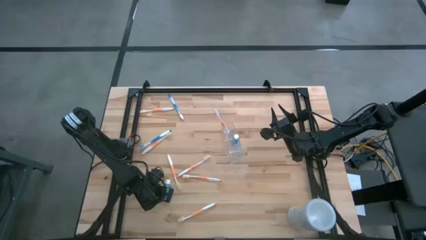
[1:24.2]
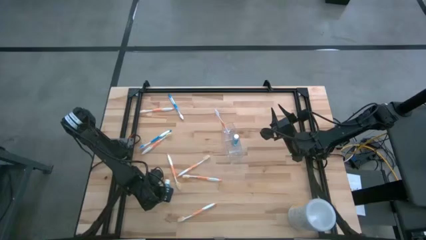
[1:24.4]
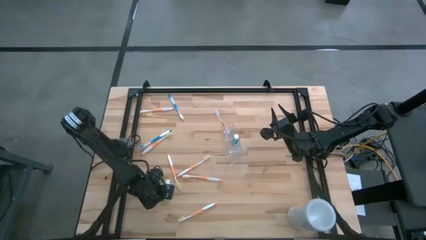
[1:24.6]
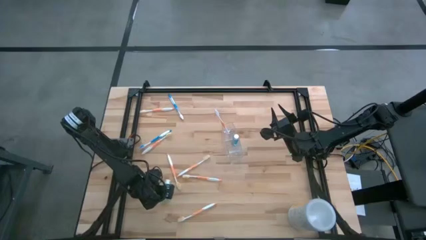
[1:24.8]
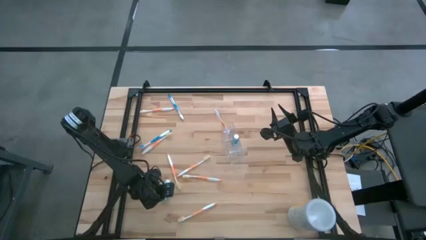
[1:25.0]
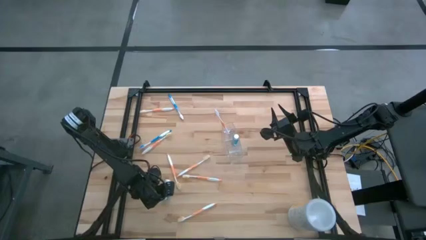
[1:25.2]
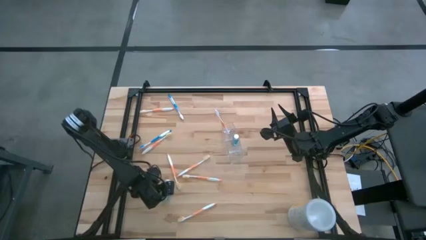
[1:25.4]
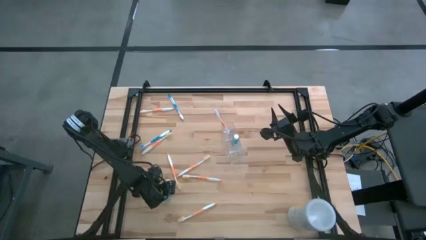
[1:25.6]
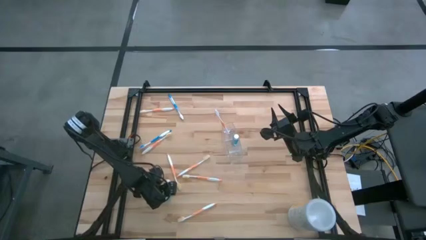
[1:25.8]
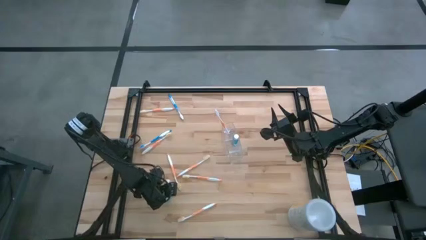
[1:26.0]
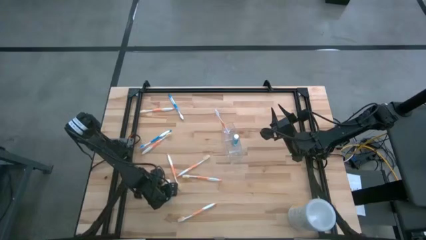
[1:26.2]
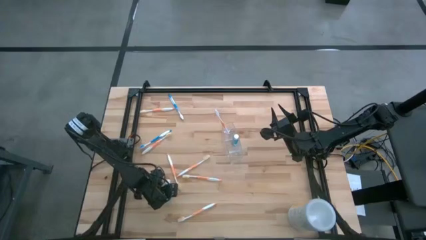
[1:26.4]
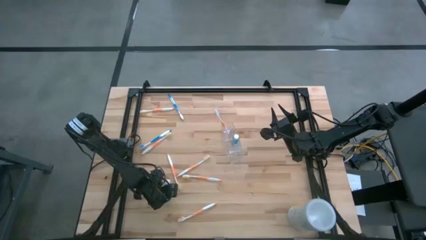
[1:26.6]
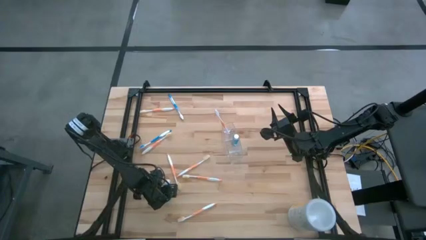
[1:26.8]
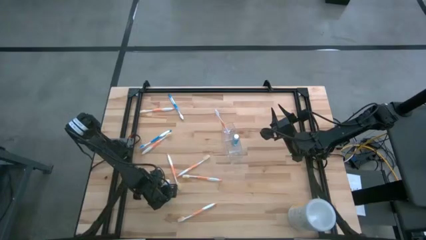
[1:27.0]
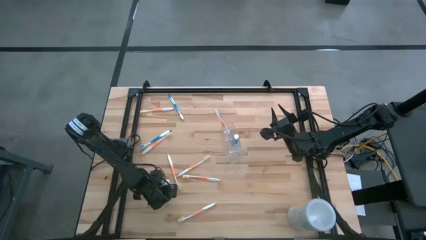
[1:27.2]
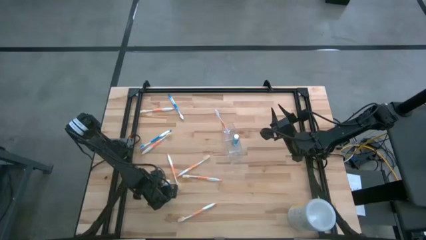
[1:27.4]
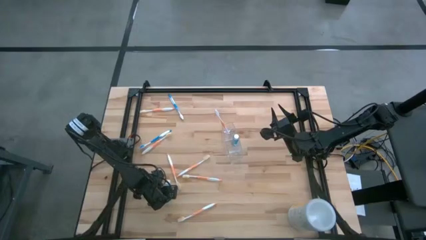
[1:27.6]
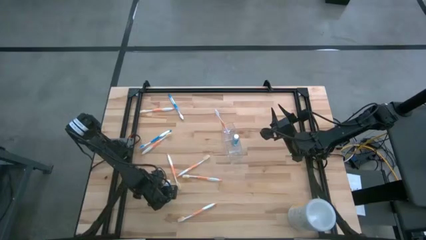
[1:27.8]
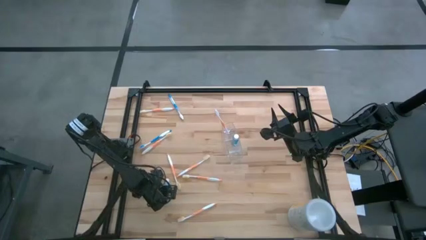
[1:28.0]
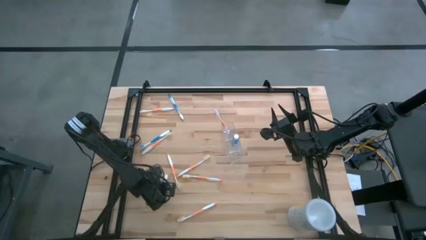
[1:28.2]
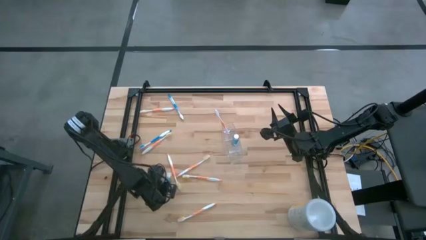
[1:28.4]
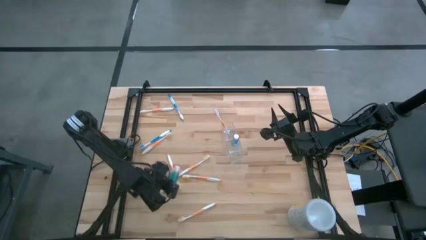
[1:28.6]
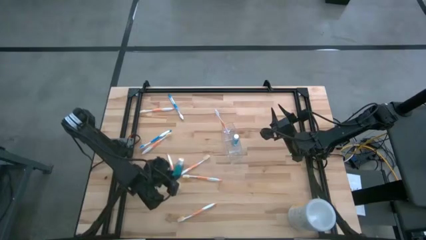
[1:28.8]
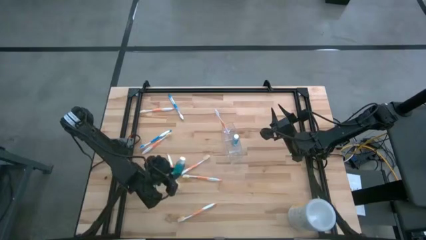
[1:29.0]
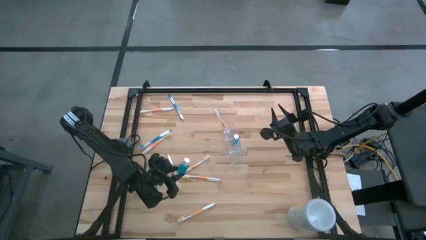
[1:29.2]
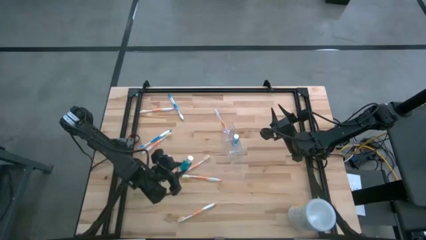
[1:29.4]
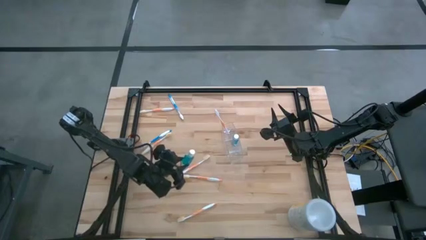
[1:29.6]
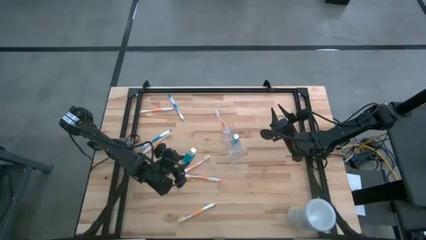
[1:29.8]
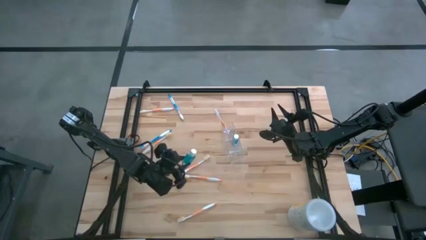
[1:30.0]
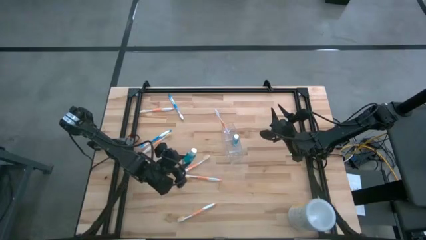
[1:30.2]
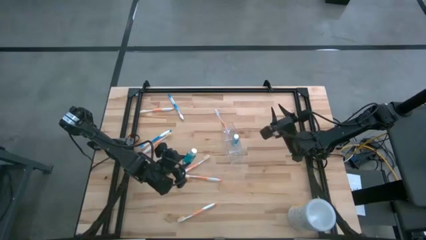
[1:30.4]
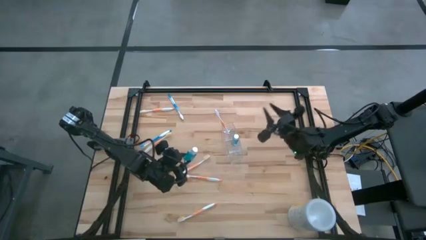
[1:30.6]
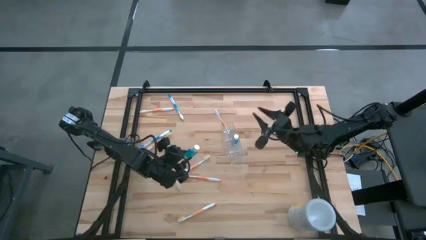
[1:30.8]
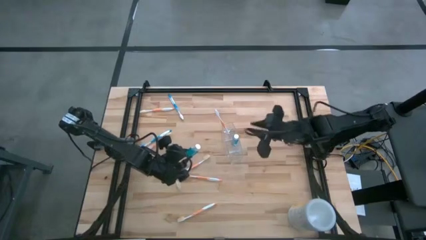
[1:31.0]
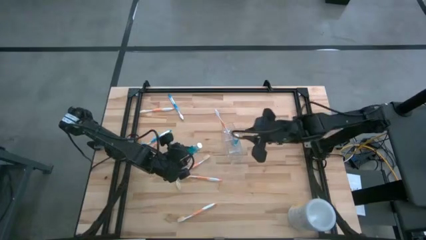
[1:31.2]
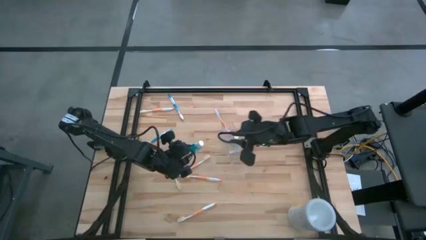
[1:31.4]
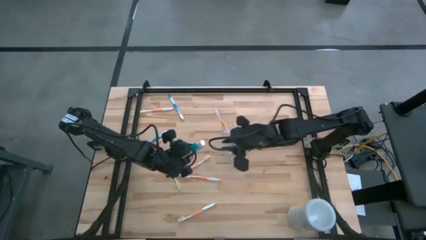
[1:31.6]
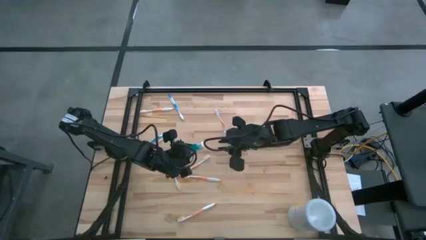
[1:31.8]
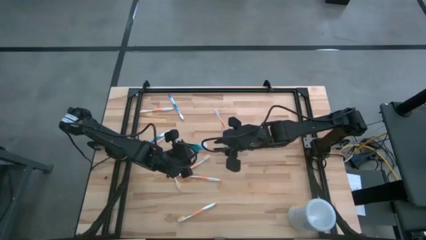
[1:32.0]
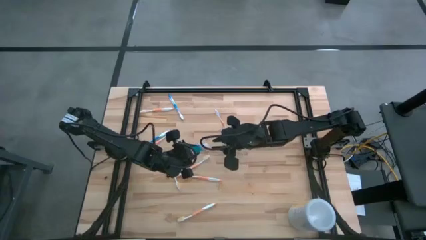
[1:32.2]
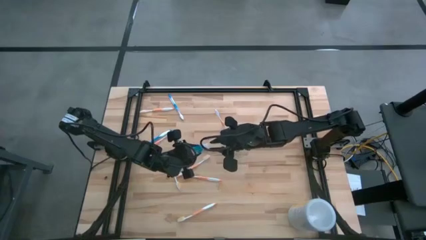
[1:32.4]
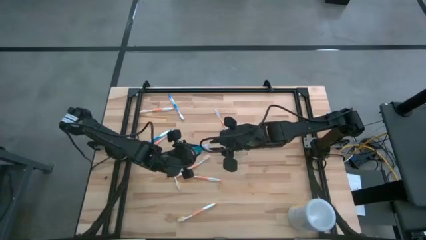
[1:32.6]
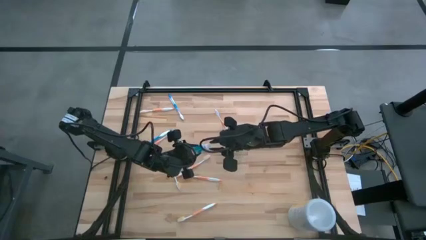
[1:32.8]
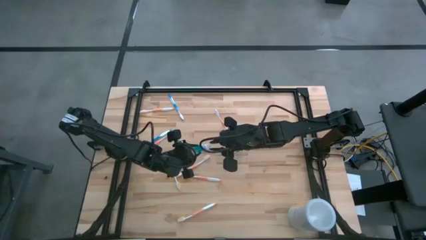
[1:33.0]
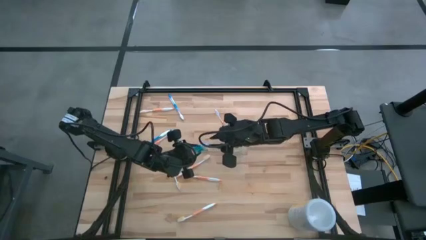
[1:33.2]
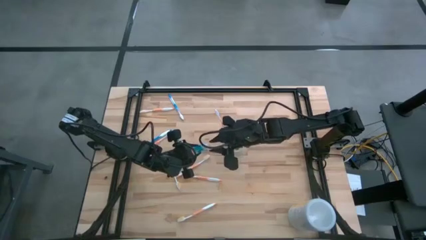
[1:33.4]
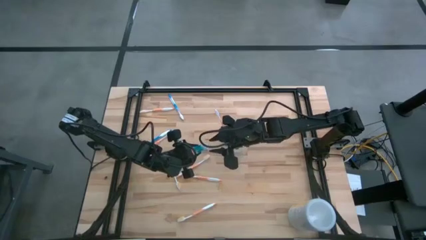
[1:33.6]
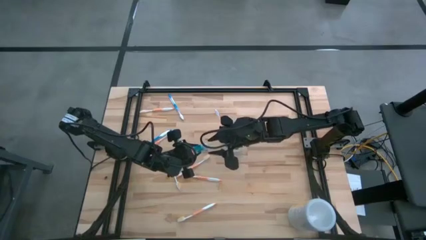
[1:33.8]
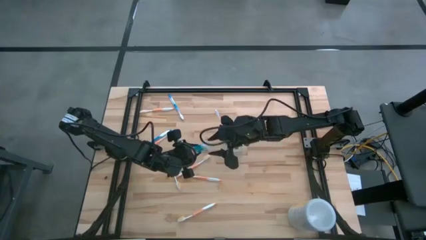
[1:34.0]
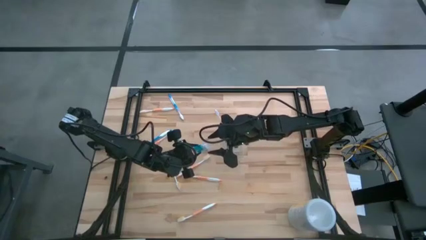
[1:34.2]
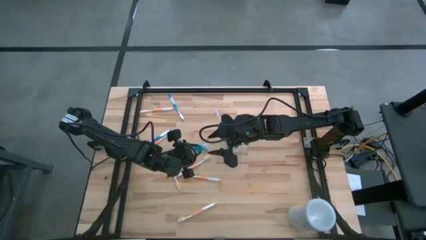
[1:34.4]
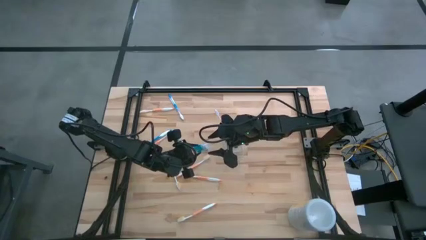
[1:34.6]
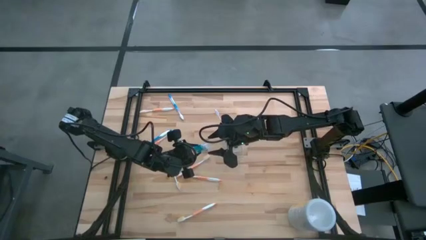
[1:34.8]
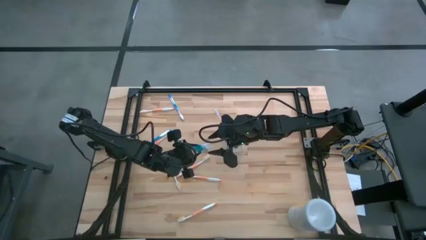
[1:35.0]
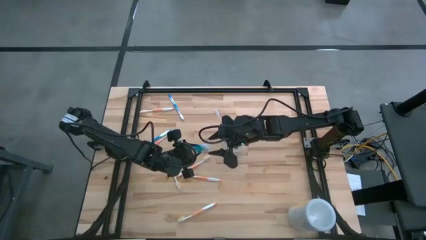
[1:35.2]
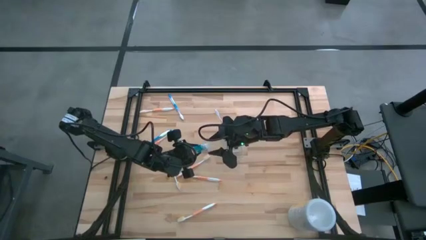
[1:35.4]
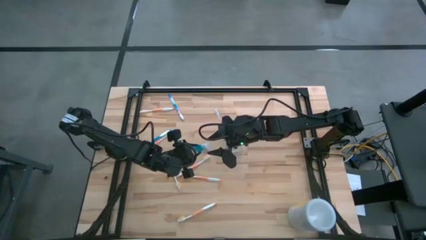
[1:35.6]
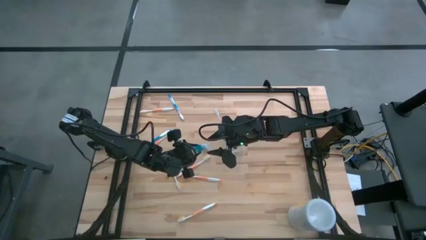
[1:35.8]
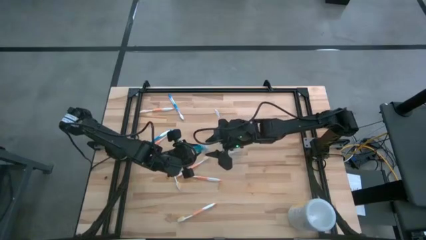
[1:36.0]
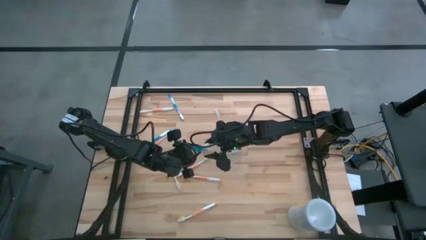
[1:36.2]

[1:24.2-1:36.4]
Task: Pick & Place toothbrushing station
Put the mouthwash into the transparent organizer

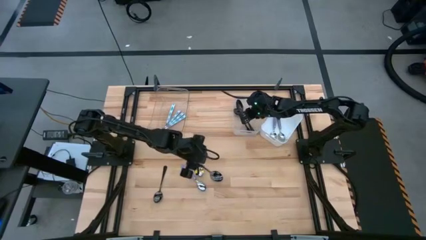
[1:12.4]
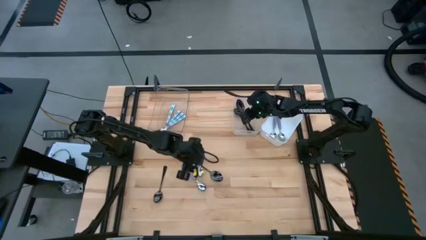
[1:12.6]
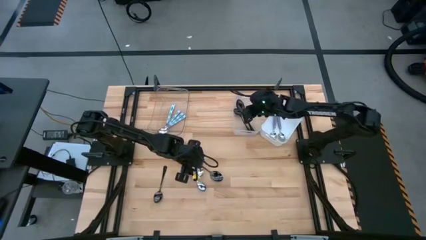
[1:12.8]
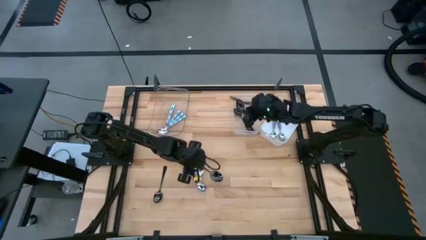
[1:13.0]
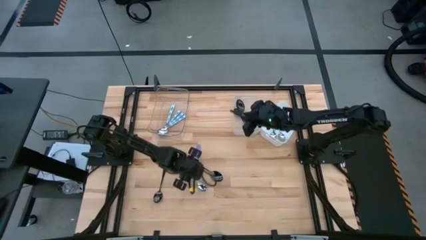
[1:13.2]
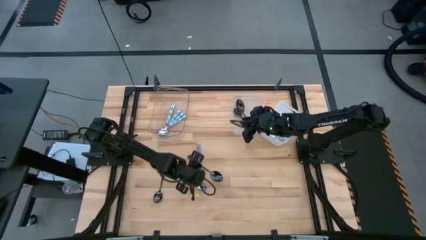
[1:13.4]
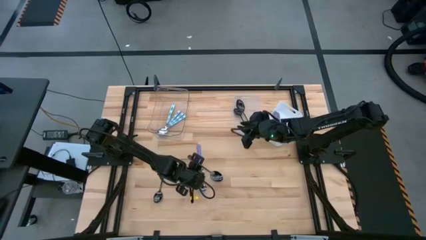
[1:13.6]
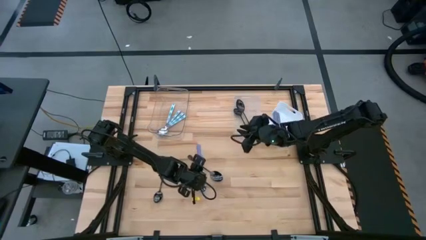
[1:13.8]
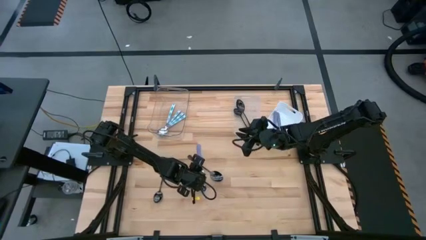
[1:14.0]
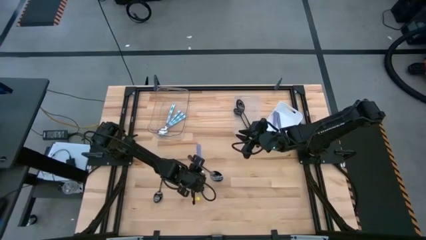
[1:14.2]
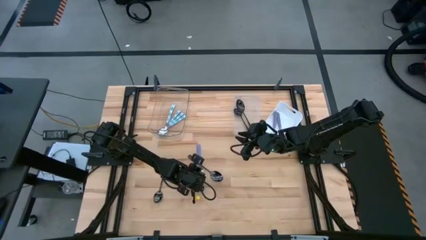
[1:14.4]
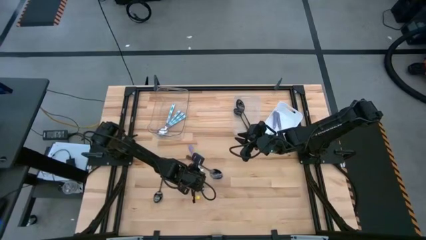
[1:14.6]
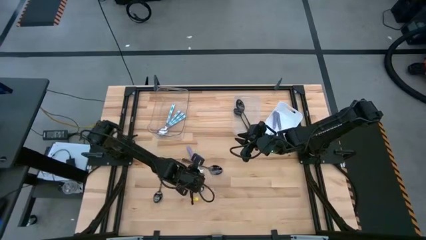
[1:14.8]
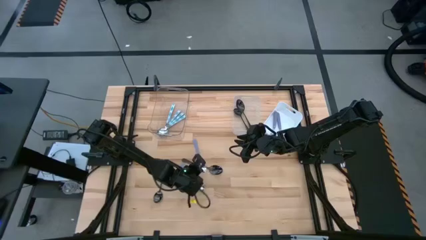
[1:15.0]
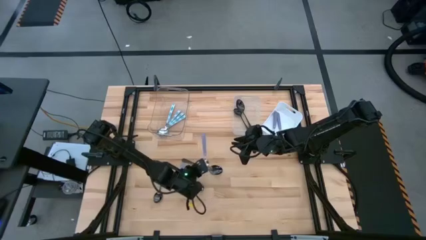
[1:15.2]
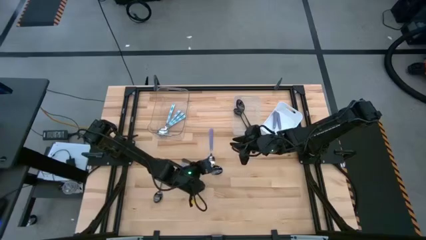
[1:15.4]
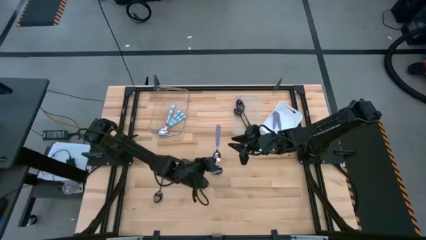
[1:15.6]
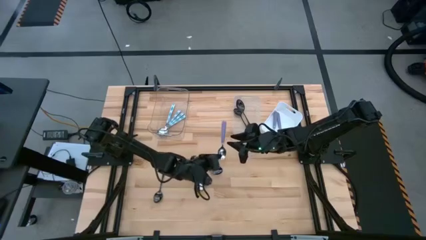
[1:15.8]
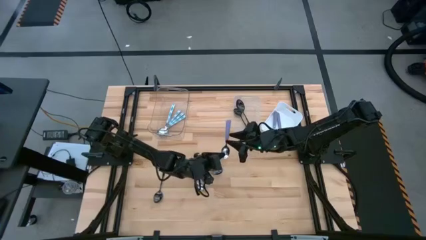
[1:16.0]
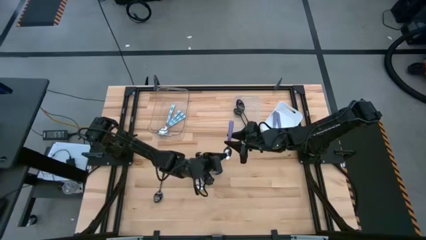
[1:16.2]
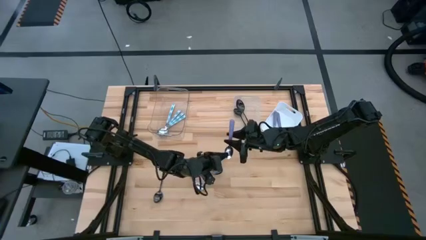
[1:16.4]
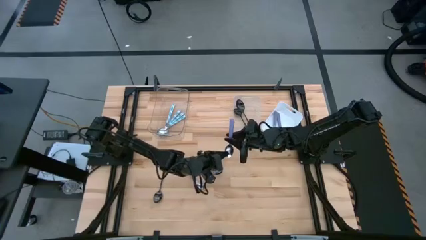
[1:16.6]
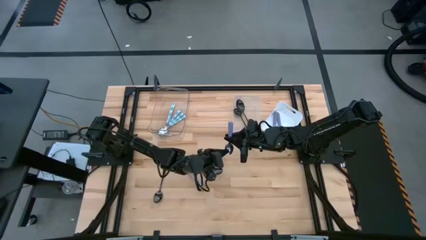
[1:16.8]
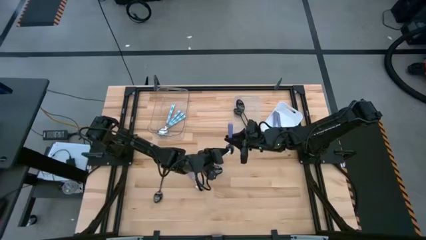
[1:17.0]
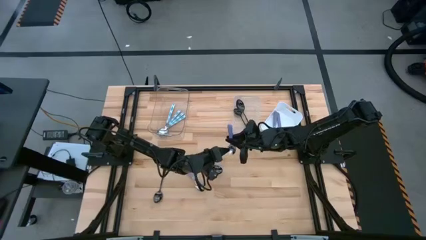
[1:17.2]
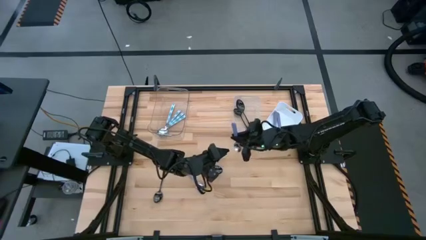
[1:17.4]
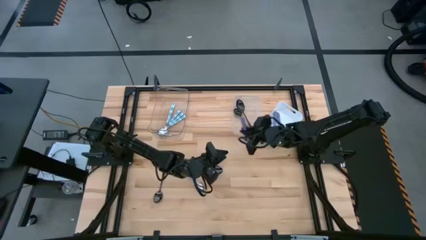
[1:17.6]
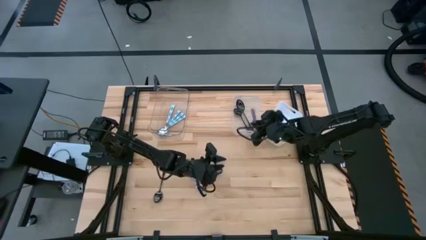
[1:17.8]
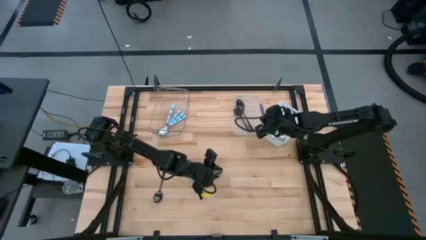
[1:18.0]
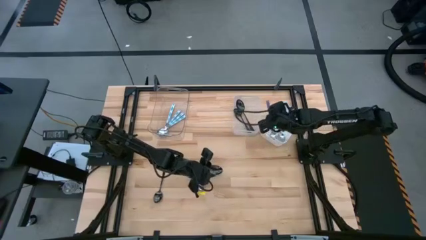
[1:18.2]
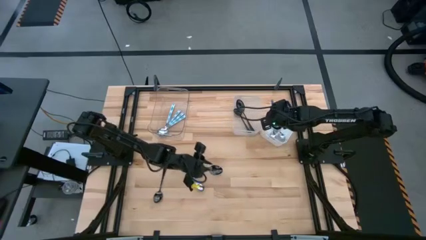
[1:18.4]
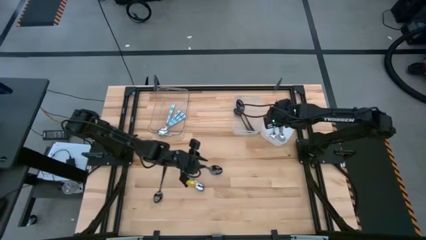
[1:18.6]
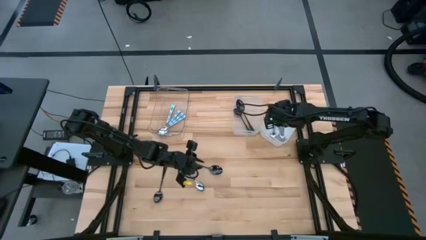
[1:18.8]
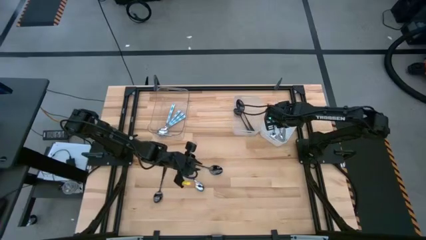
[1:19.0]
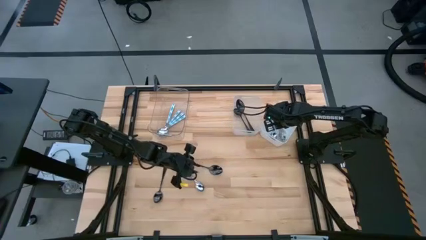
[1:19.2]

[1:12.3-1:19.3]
Task: Sort silverware by color (type)
Put the purple spoon into the white bin
